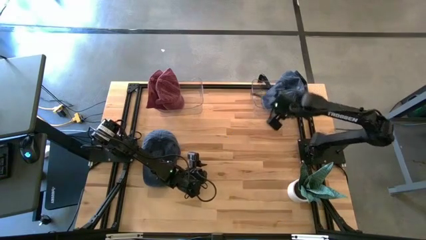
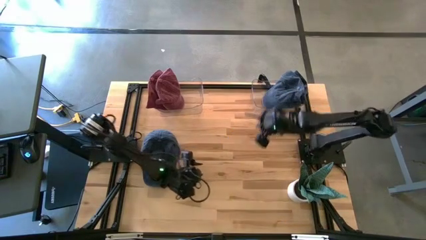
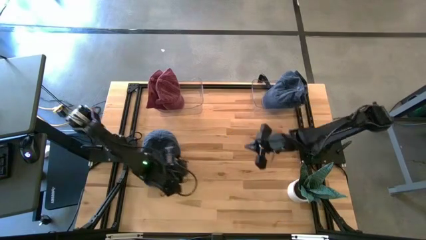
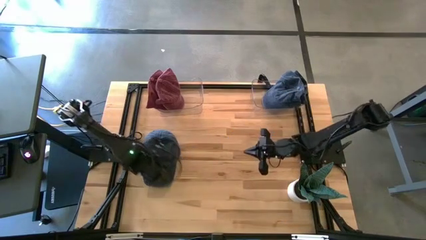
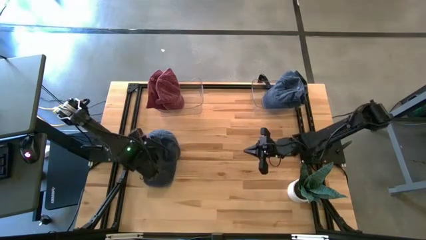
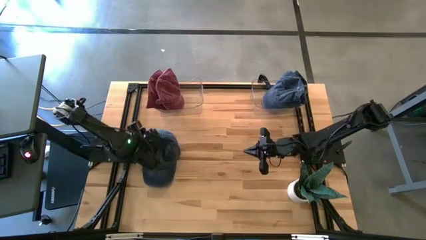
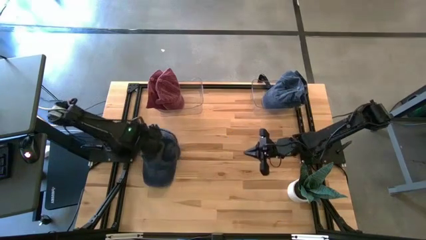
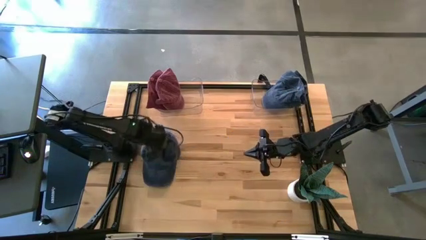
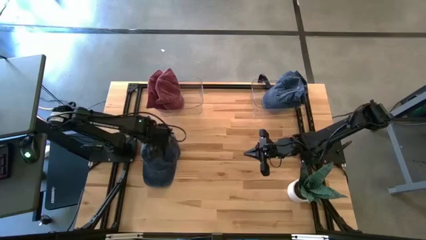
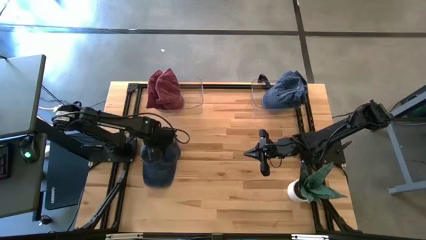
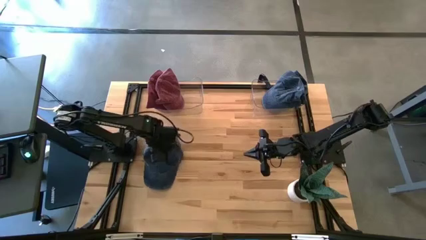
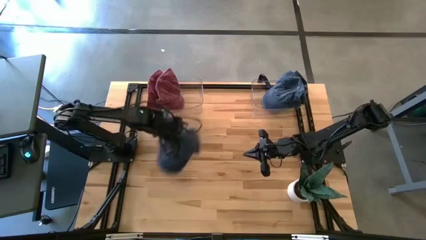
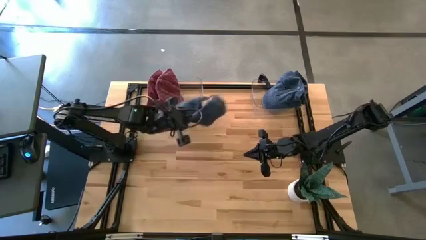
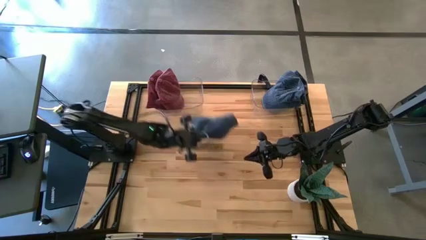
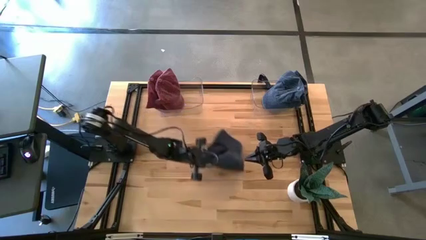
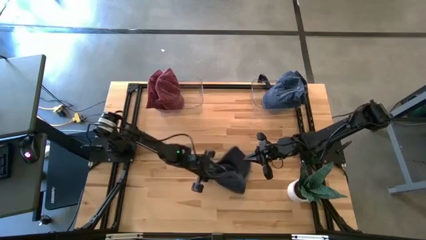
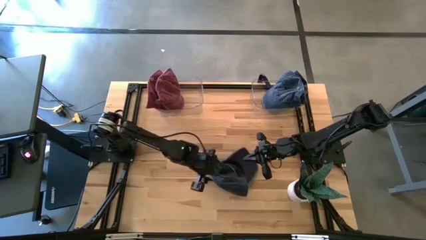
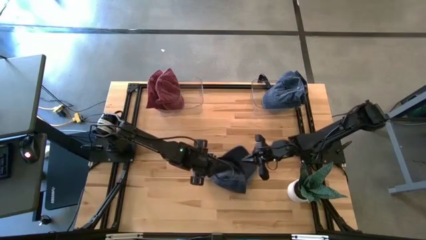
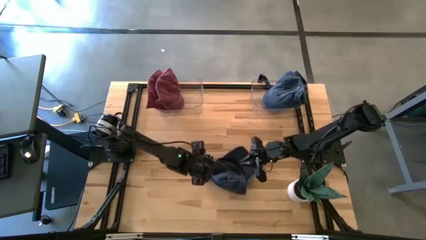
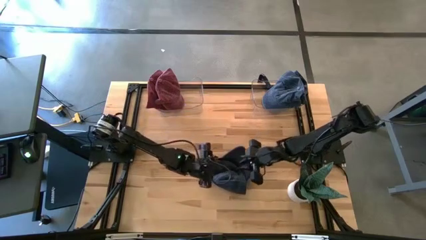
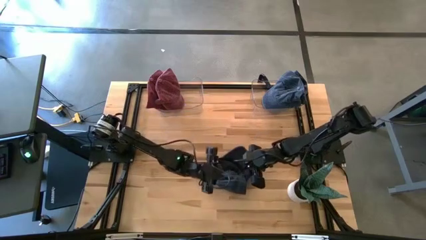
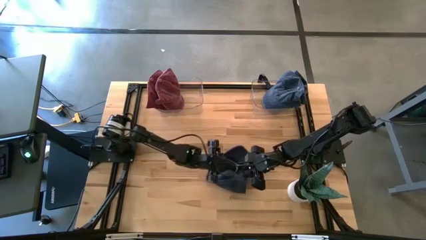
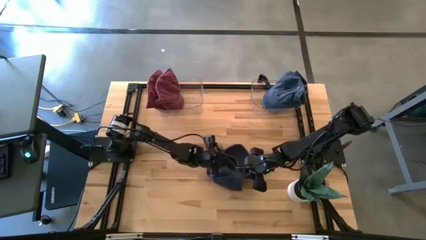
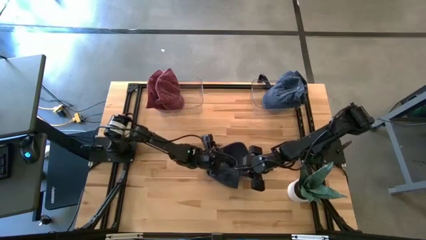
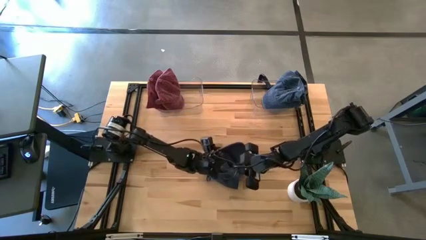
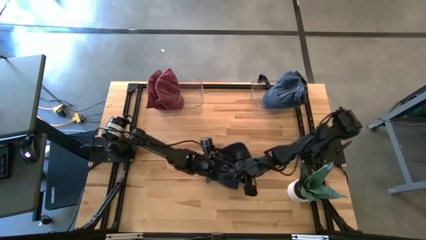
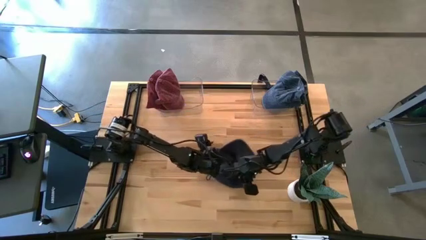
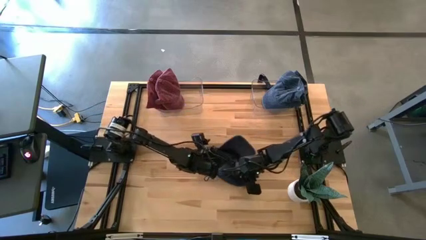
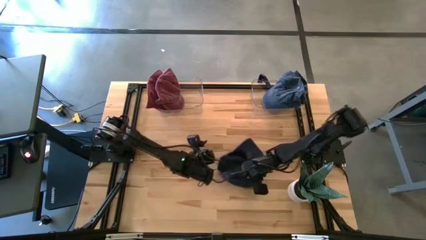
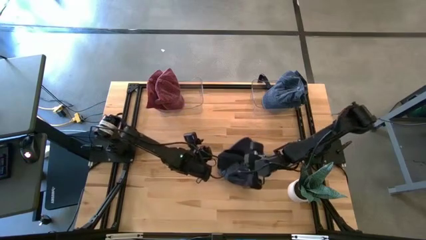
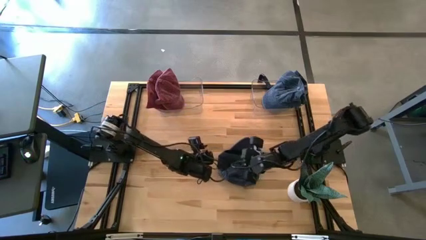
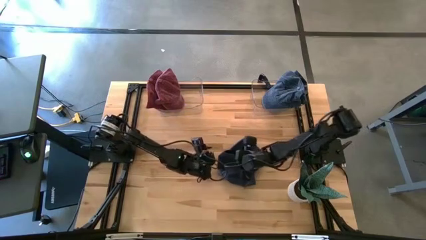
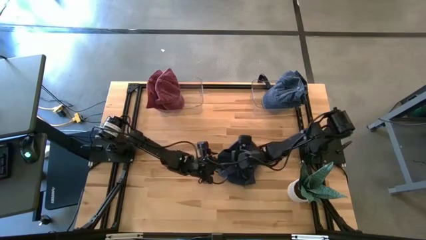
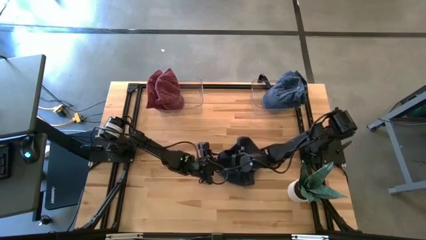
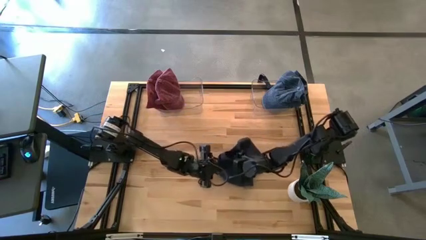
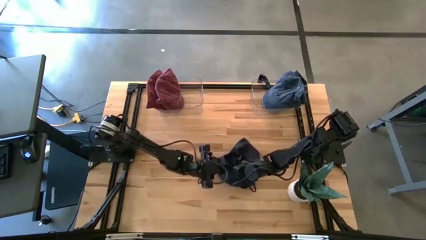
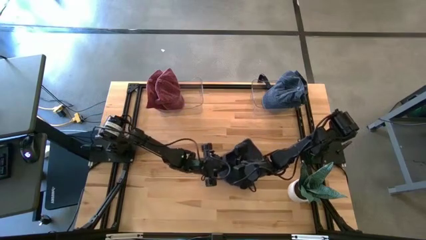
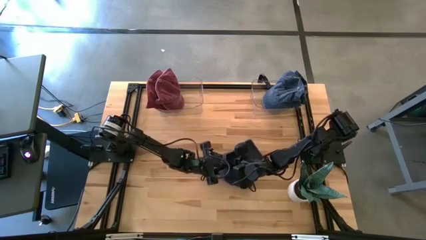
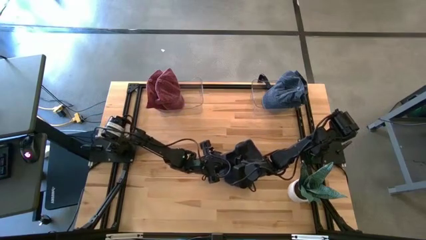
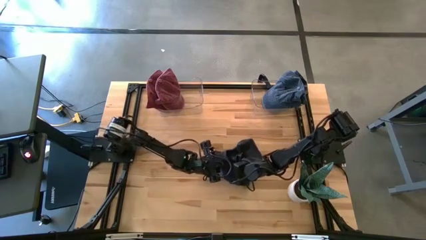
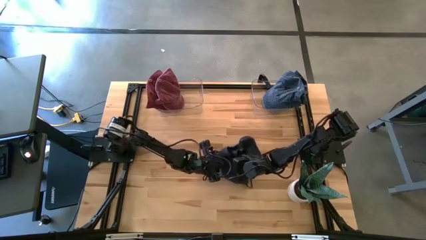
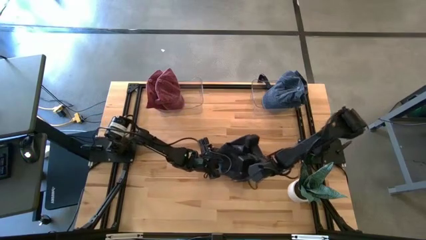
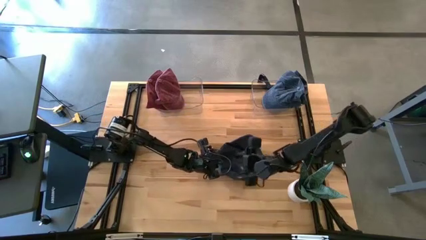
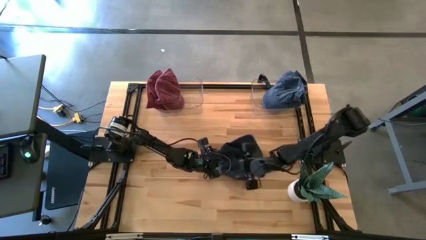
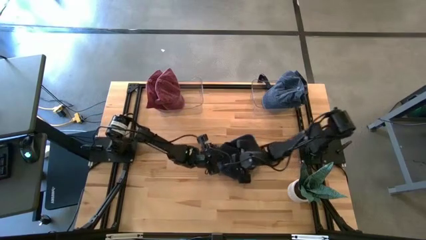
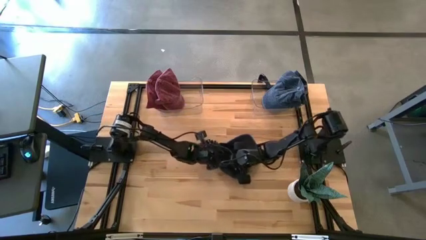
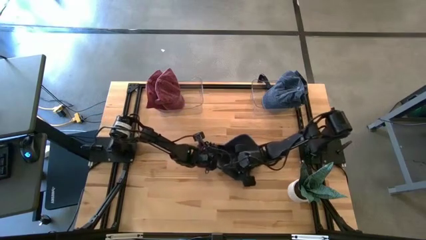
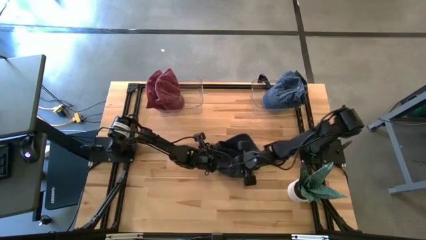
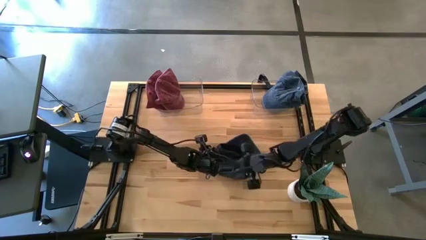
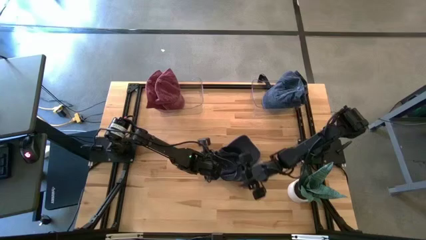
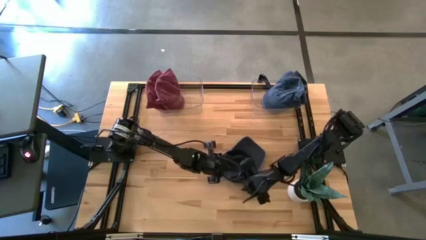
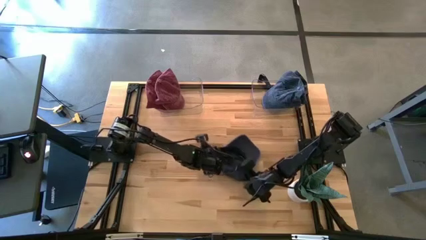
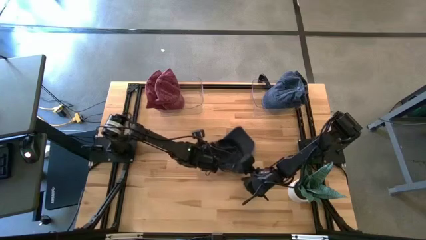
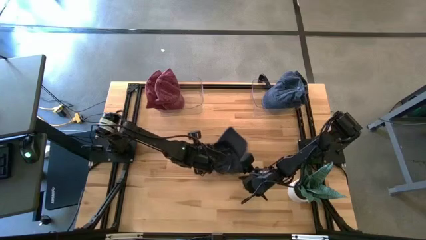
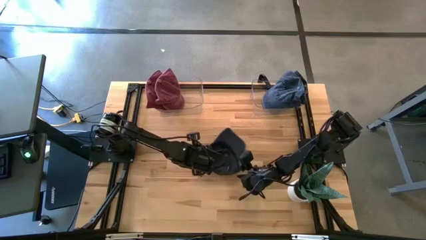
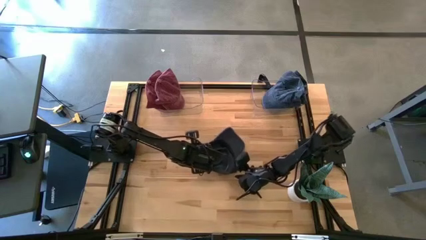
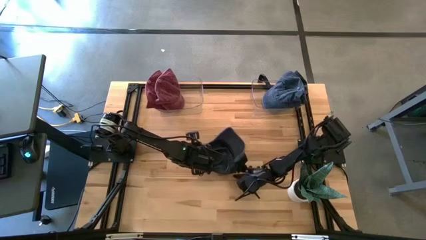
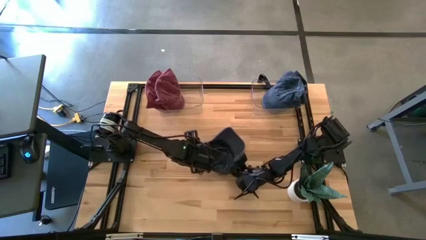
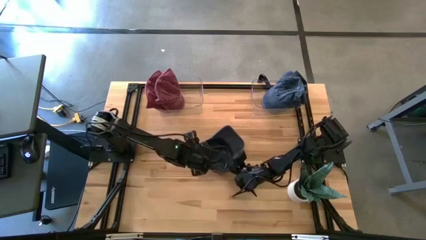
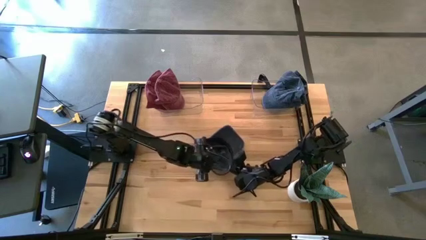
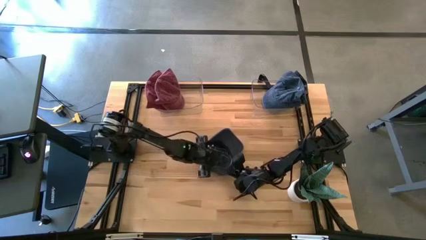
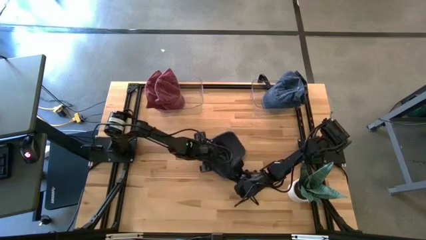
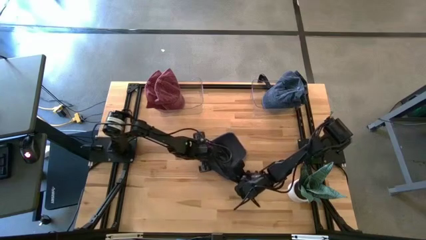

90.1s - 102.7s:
Task: Pick & Place hat
Put the blue cap into the right transparent bin
